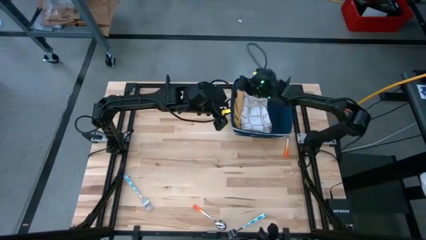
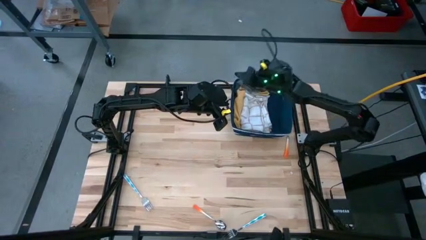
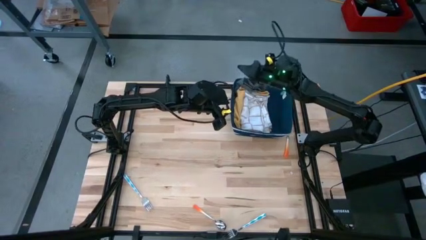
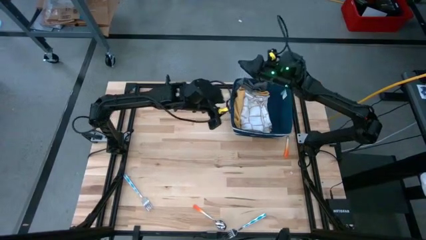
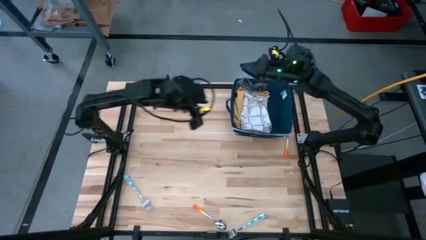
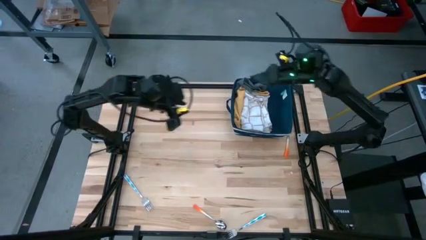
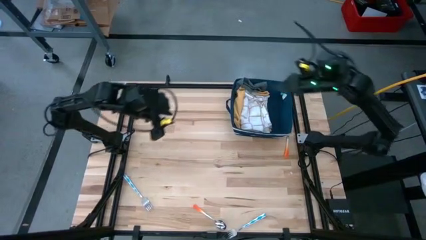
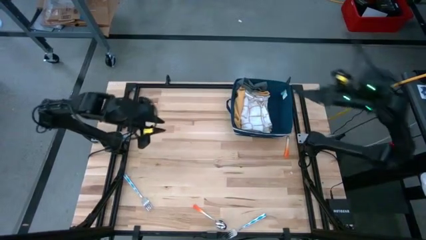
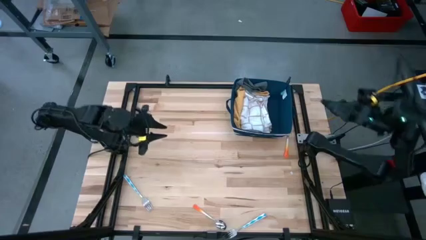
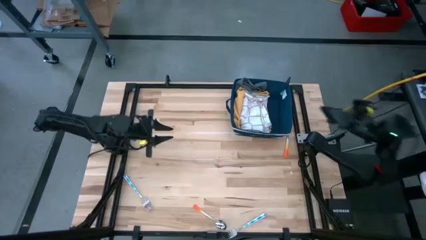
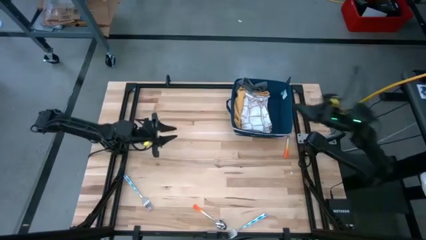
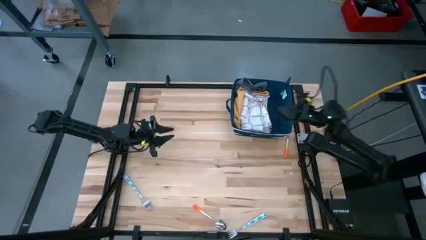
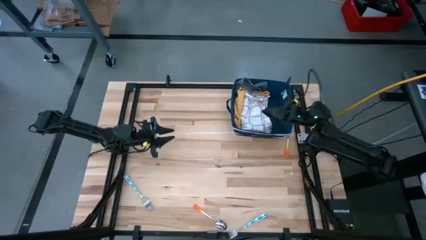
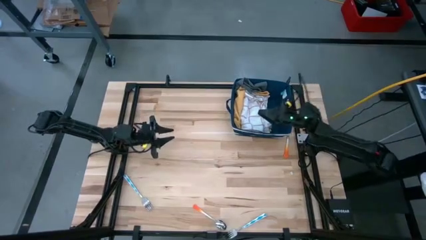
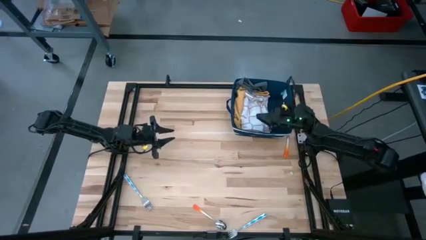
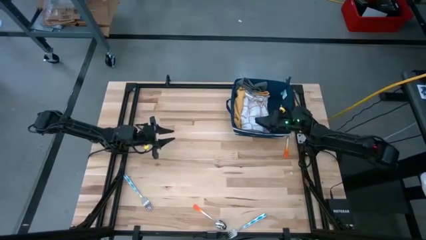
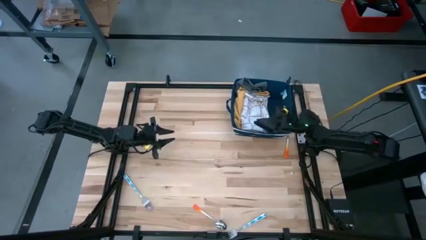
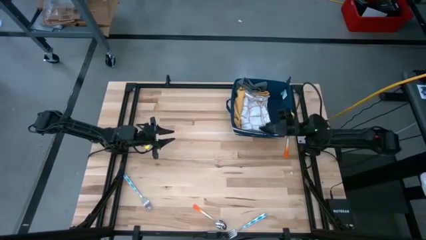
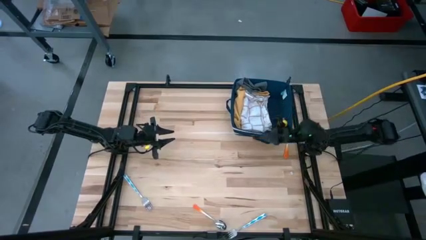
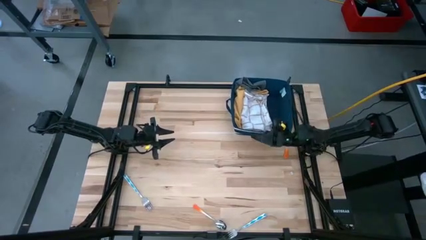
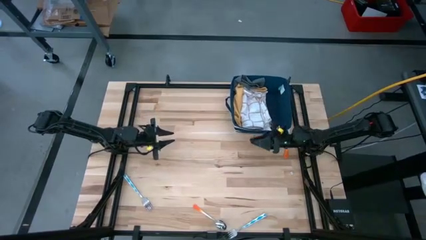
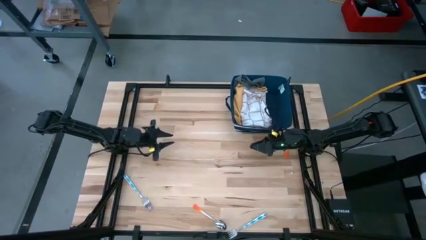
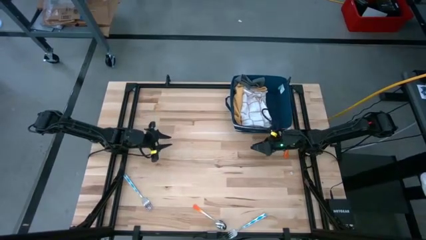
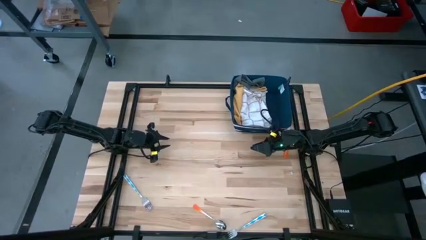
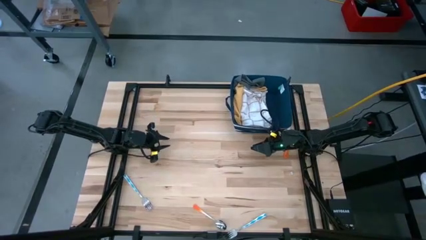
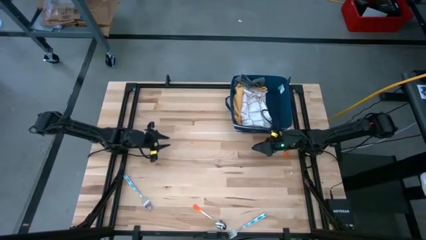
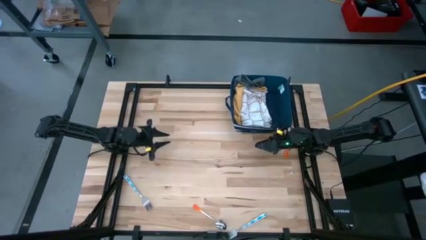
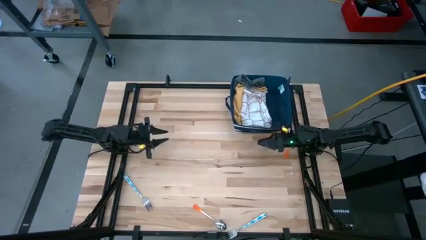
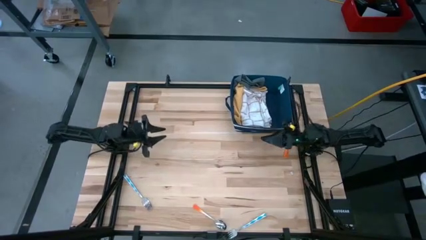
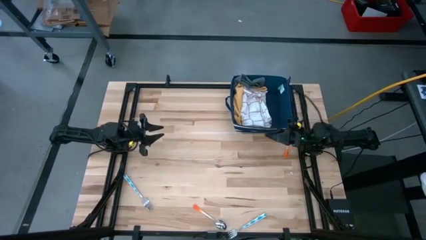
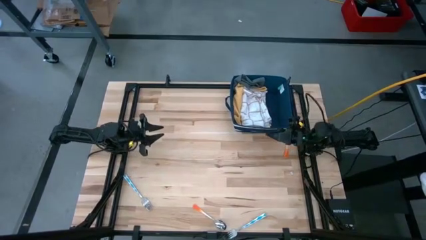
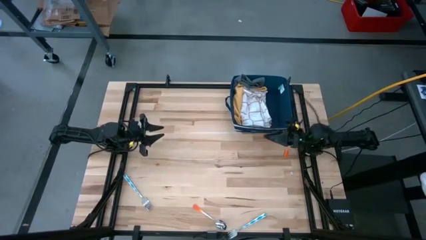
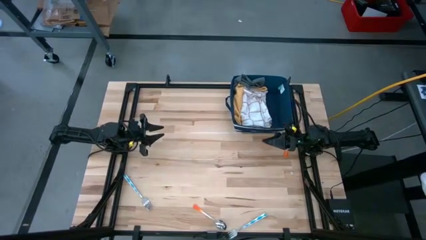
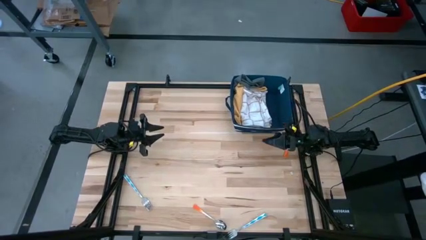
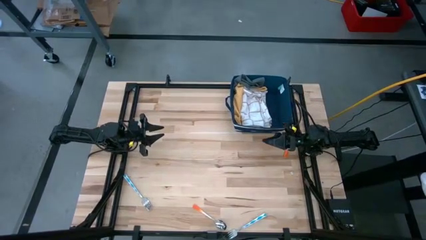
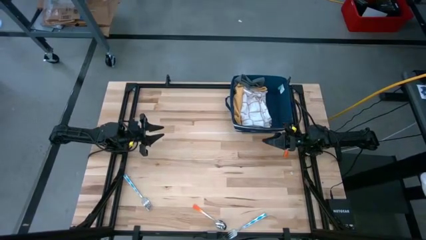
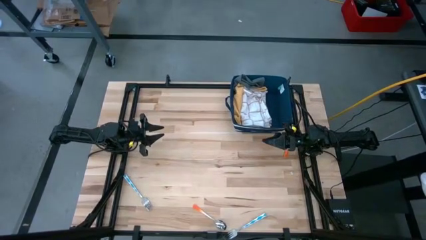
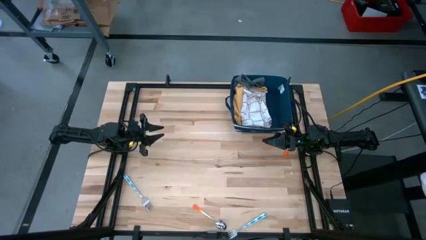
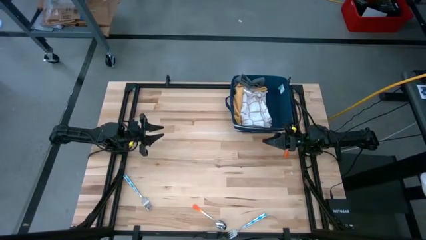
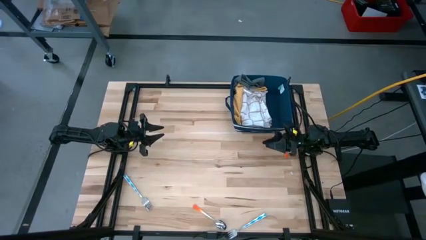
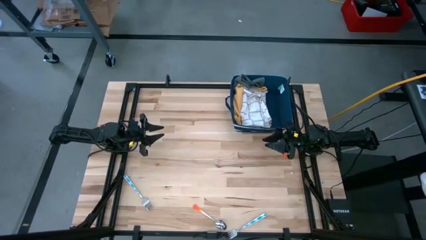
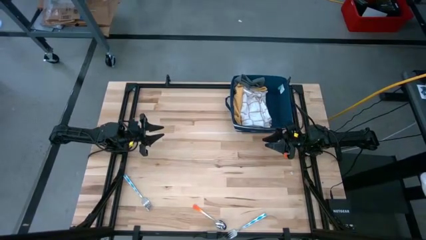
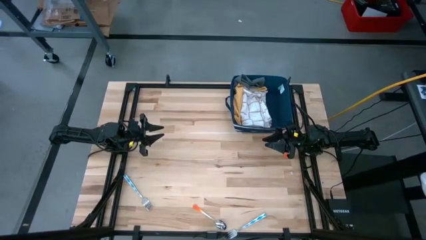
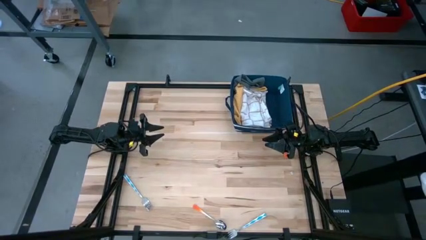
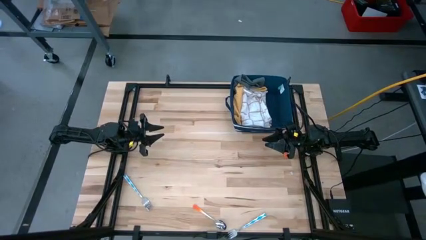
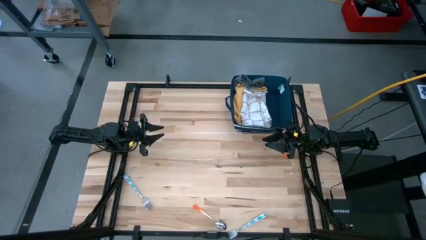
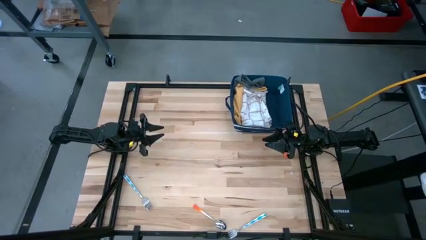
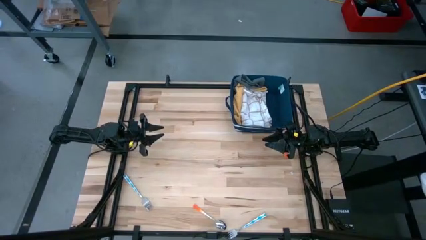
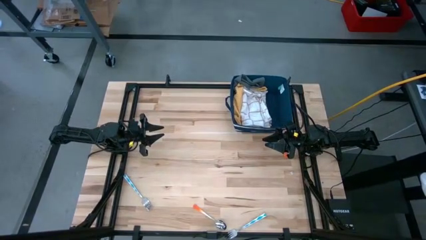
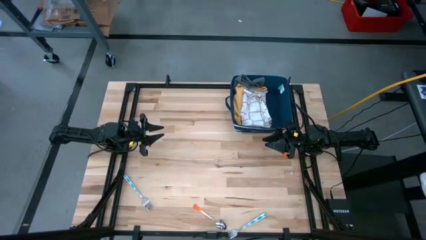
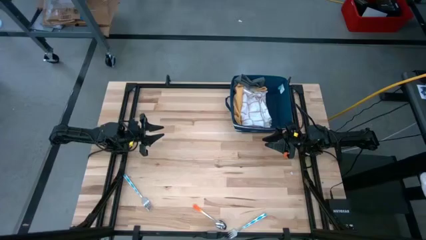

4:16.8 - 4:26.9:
Task: Fold towel
Return to Home Position

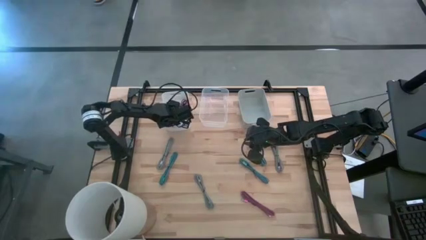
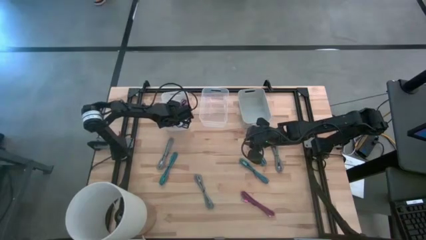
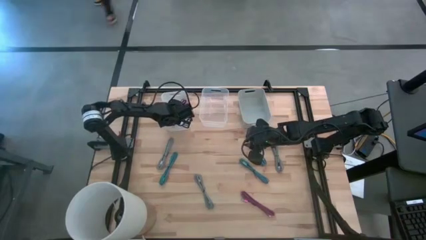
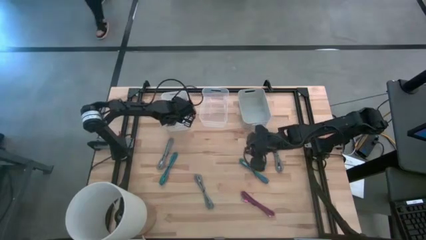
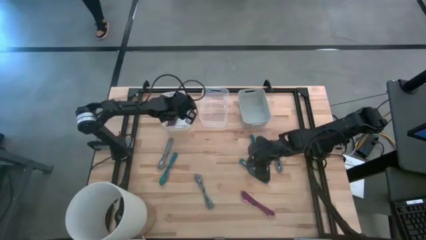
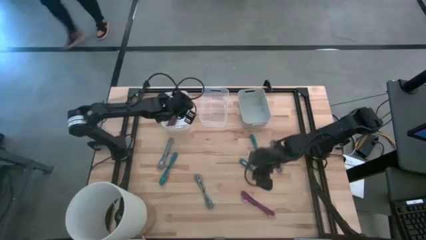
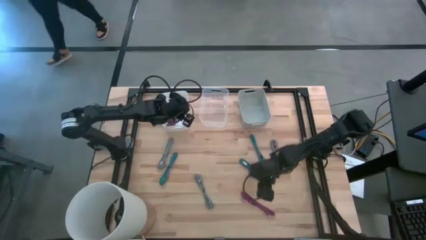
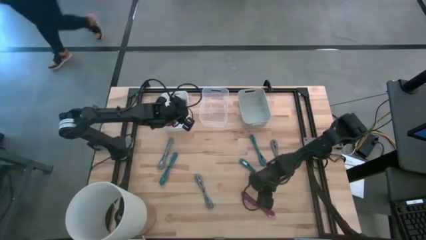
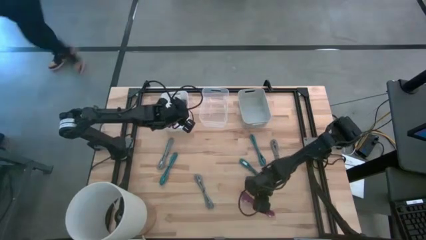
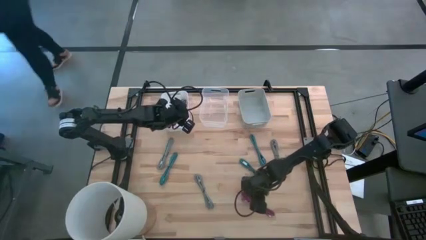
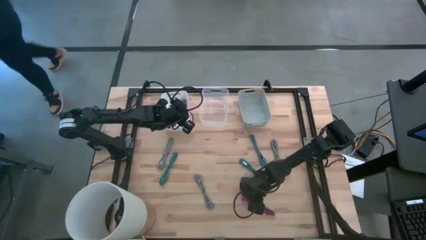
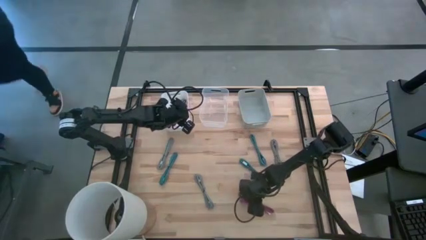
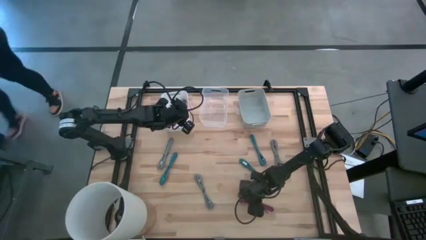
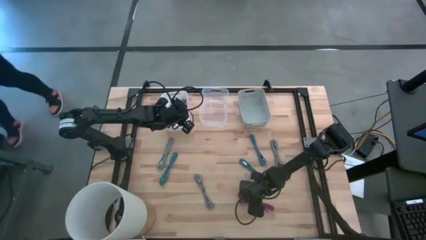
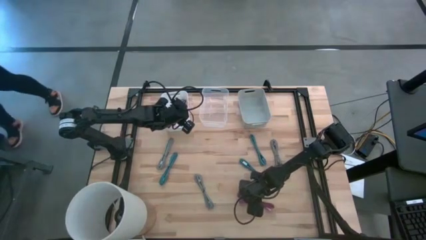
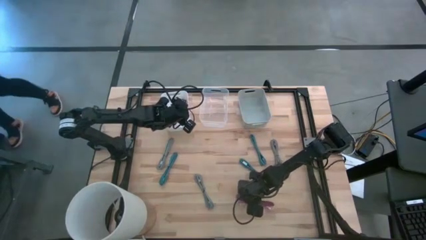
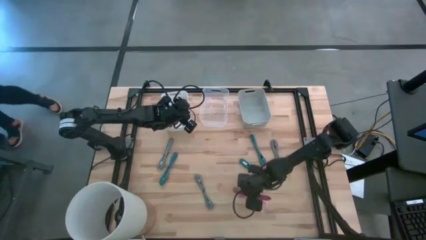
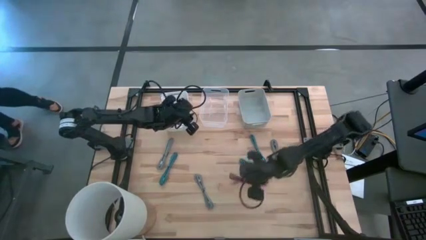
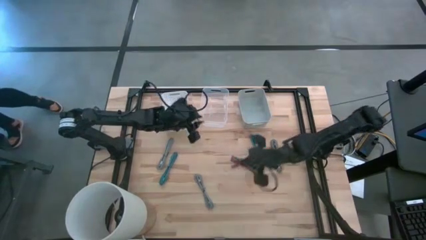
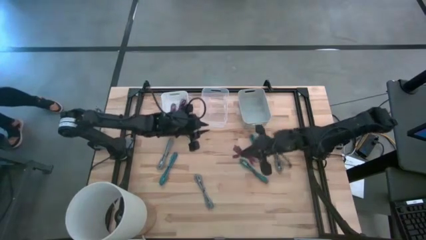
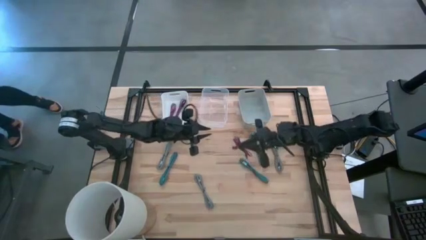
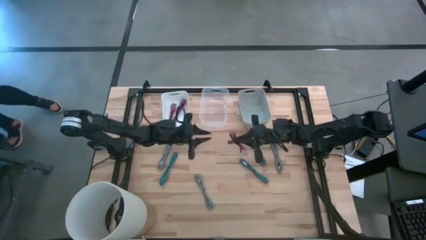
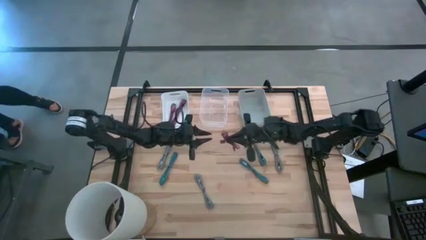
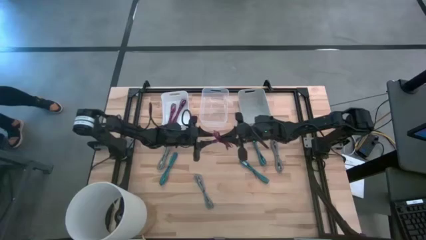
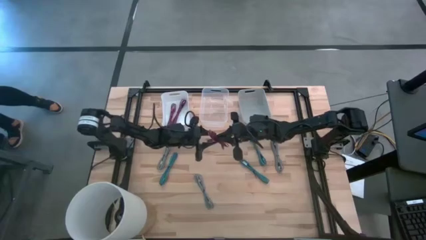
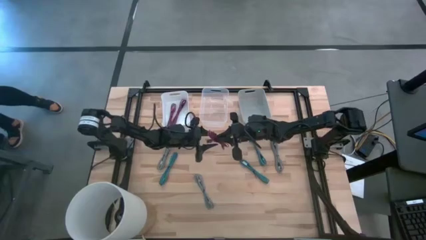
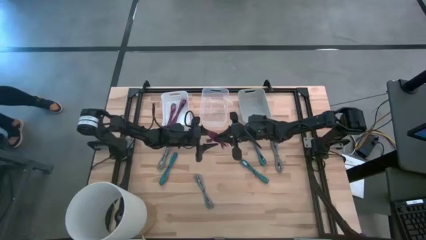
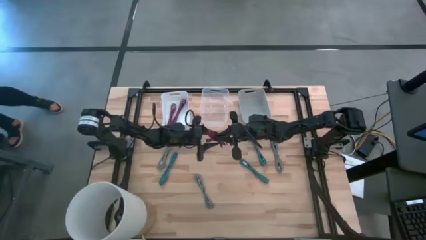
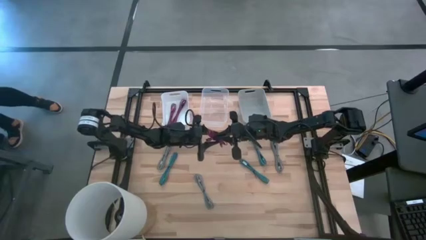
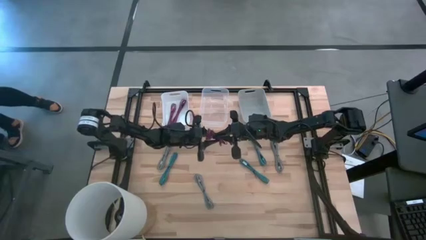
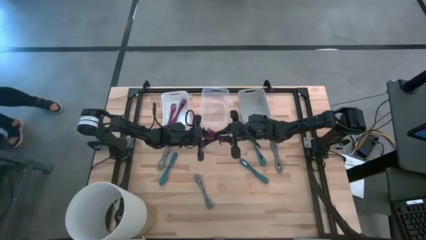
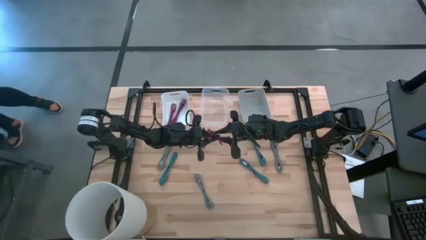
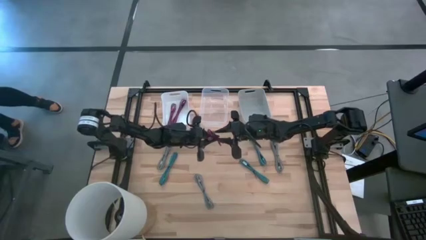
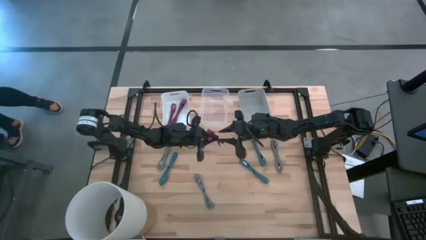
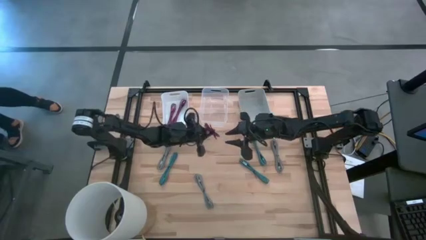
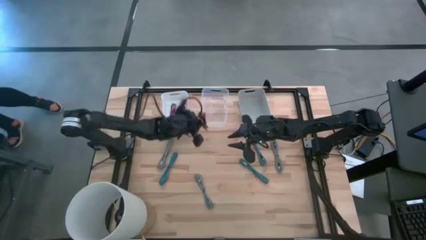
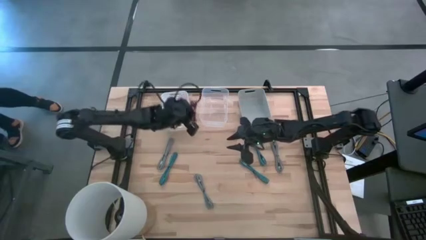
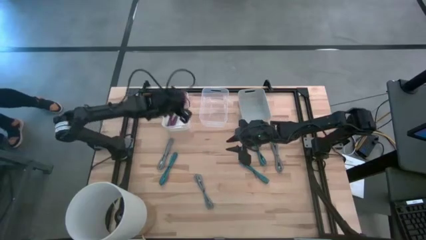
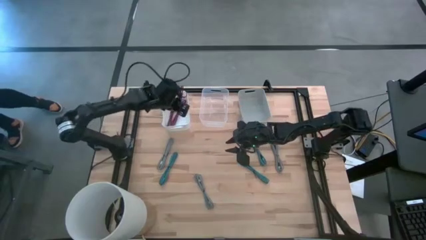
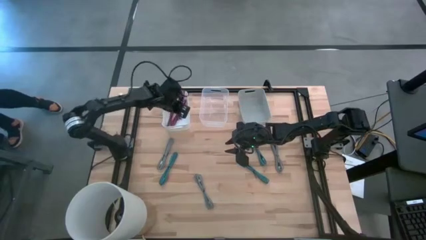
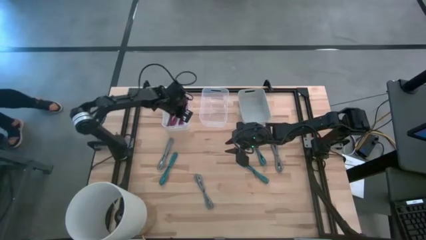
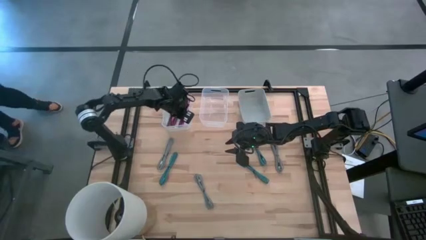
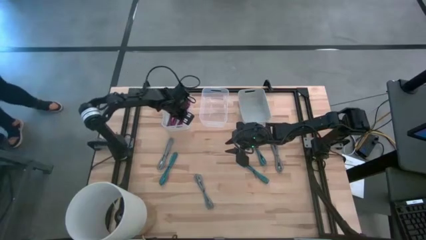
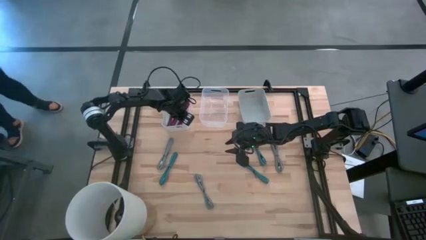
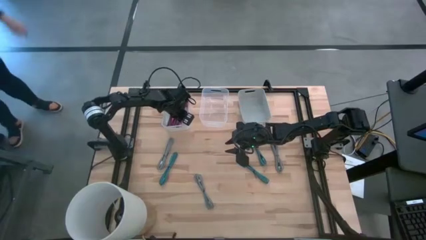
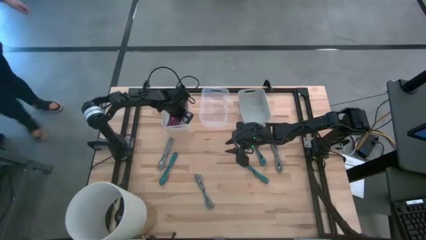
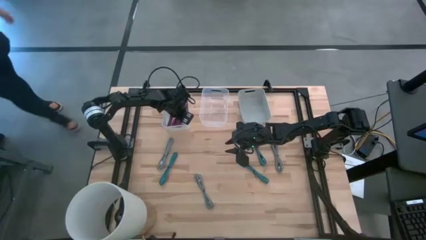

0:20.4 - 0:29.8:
Task: Pick & Place USB Port
Put the pink charger cable into the white bin
